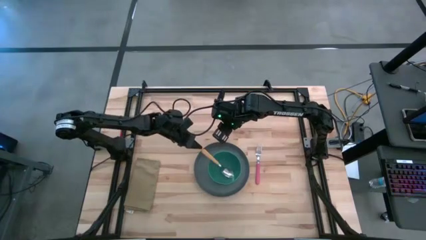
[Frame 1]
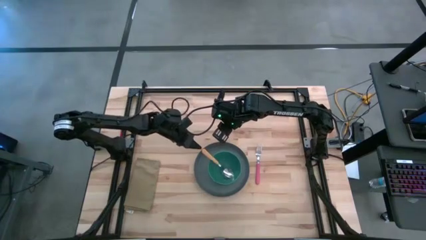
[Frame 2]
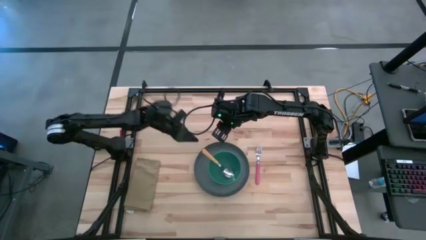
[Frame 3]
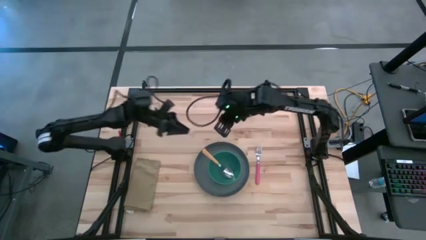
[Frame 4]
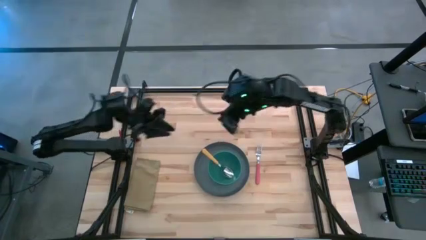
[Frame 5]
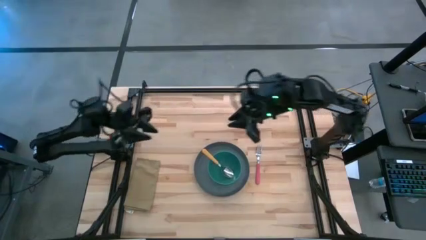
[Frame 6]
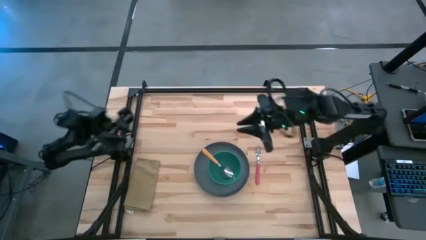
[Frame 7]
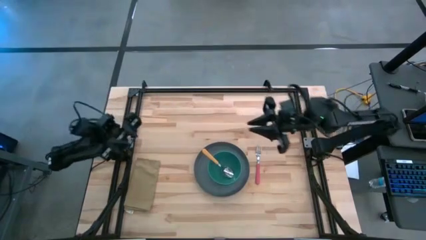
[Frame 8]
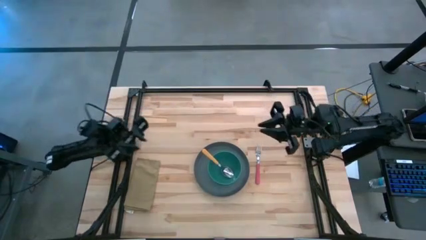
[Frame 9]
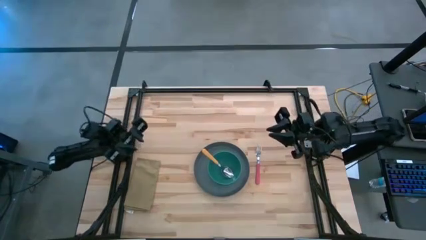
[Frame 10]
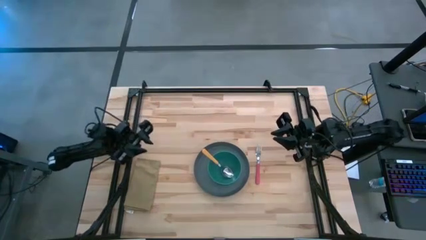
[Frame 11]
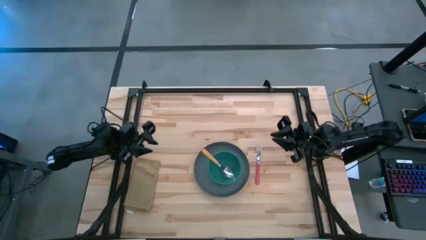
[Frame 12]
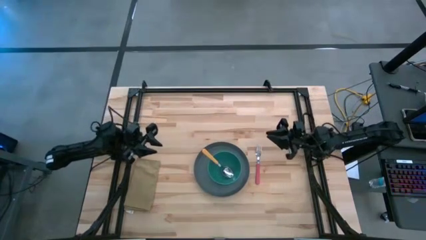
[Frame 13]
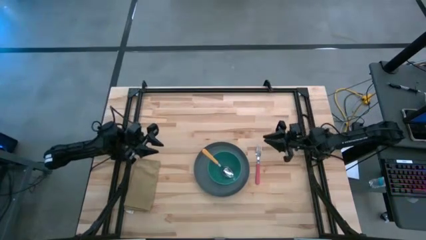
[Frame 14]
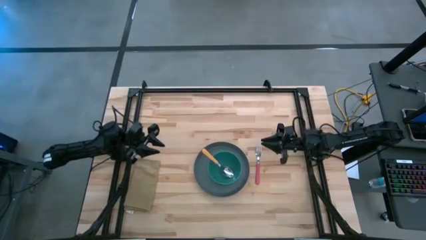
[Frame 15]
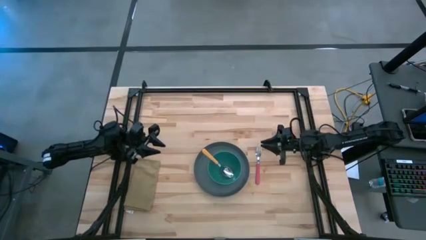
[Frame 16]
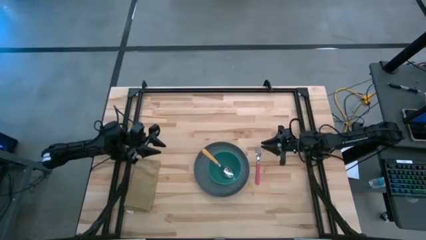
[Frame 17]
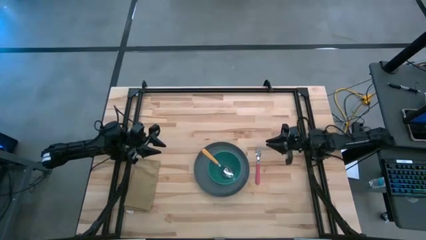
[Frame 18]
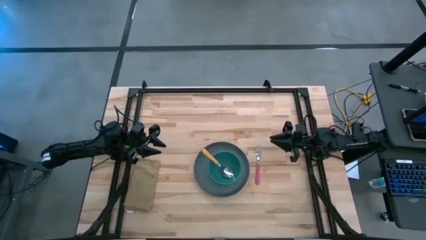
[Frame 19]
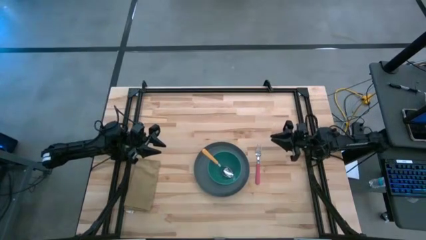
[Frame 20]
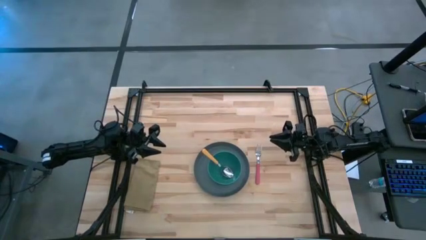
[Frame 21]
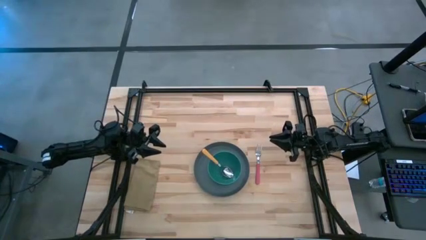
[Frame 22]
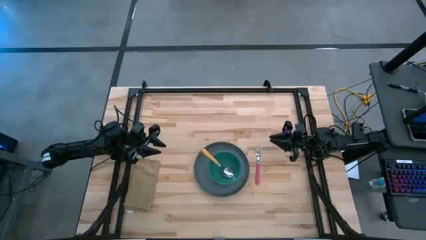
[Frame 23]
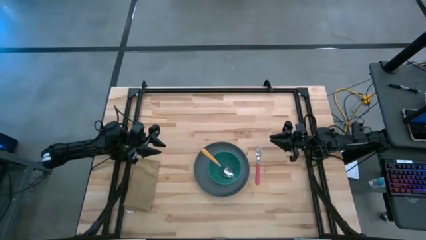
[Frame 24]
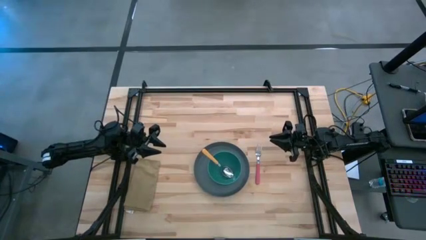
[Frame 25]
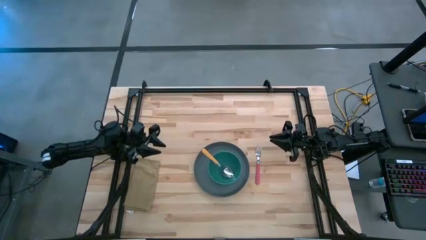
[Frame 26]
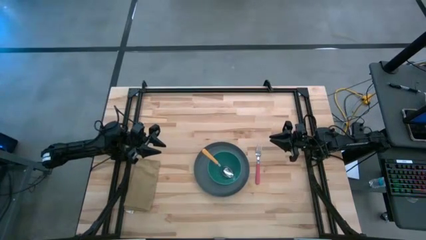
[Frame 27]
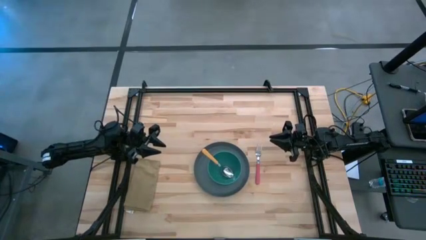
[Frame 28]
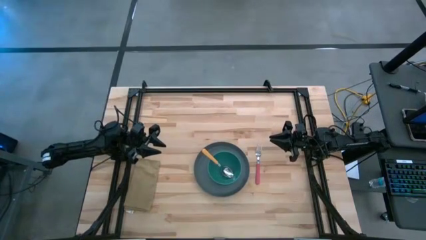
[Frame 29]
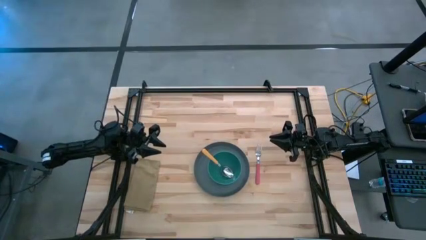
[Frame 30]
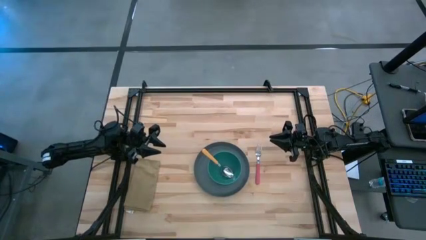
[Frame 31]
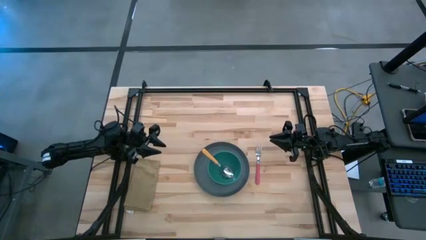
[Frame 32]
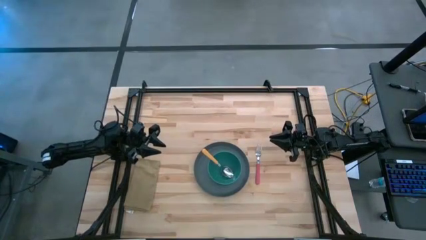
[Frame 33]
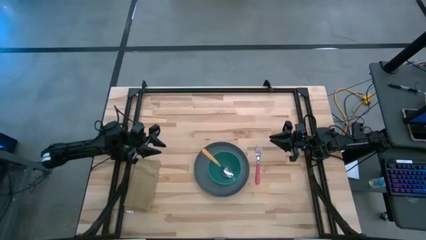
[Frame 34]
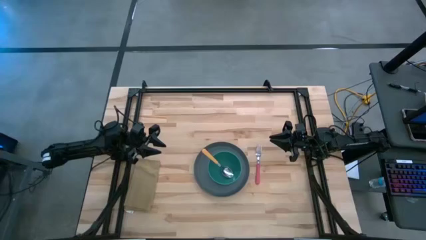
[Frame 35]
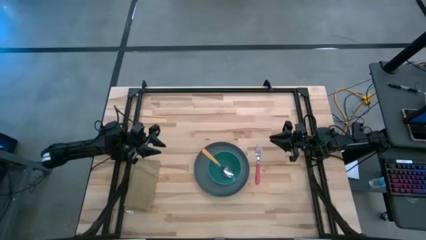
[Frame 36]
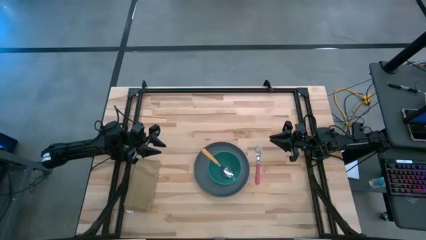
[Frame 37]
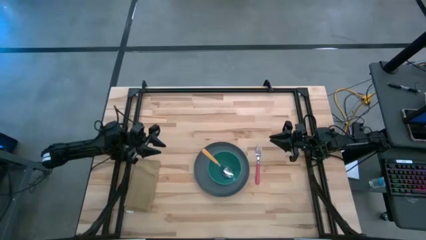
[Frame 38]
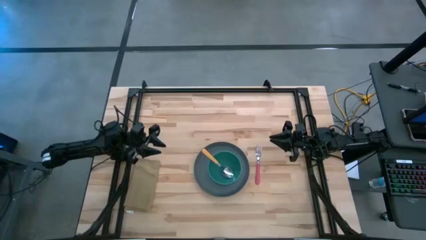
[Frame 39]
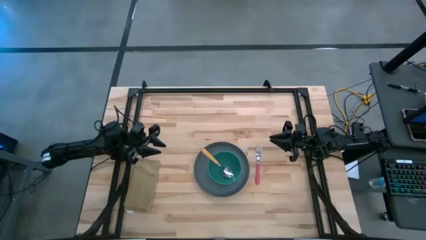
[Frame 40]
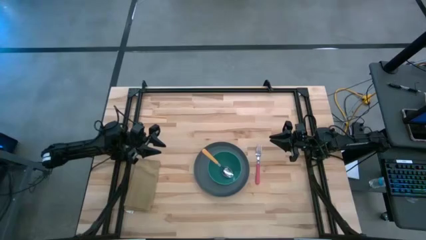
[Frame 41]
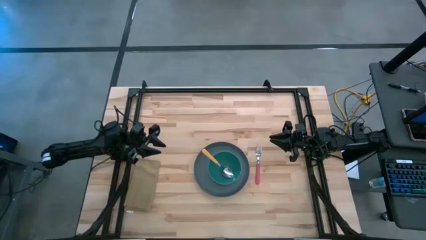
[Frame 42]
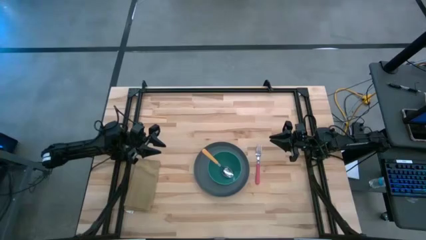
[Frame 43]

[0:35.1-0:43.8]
Task: Set table place
Return to Home Position

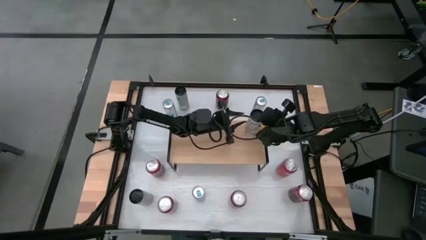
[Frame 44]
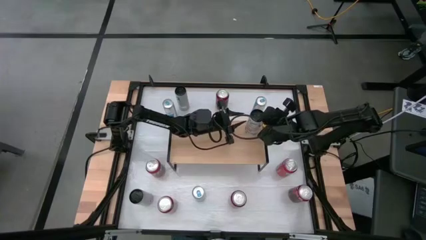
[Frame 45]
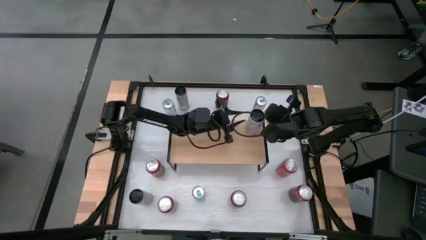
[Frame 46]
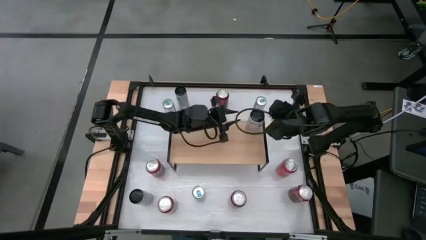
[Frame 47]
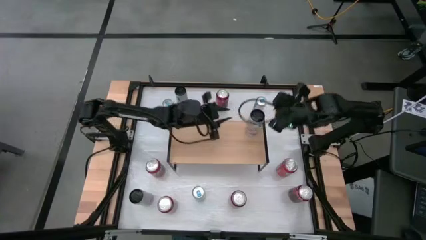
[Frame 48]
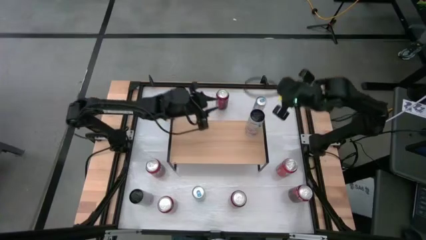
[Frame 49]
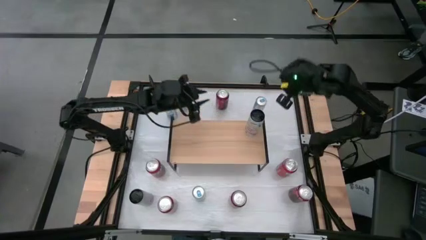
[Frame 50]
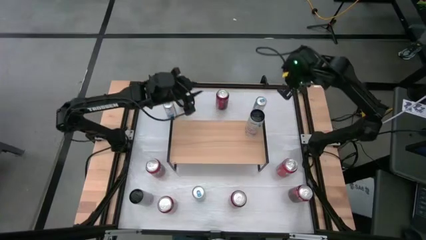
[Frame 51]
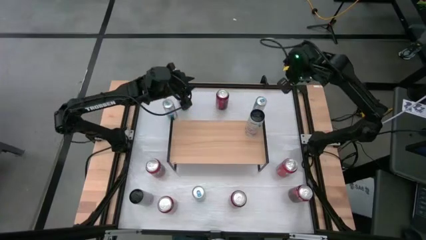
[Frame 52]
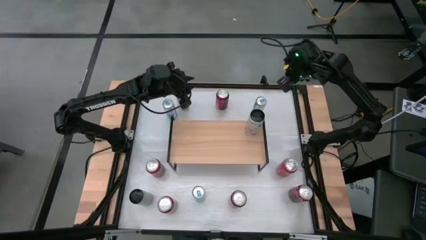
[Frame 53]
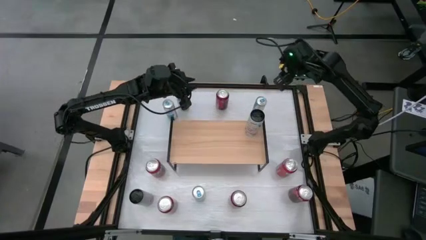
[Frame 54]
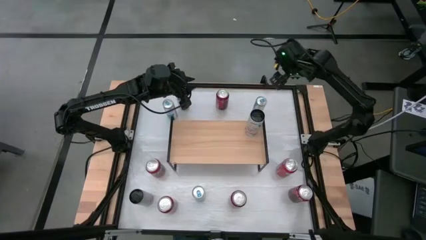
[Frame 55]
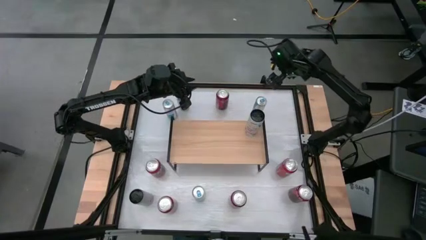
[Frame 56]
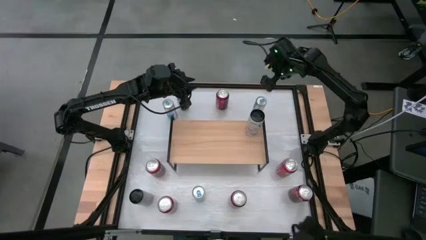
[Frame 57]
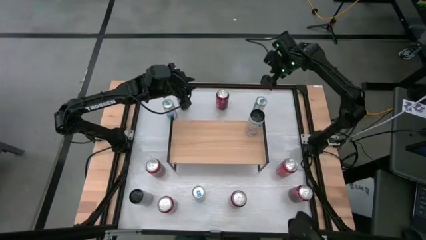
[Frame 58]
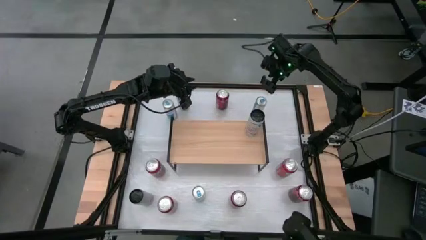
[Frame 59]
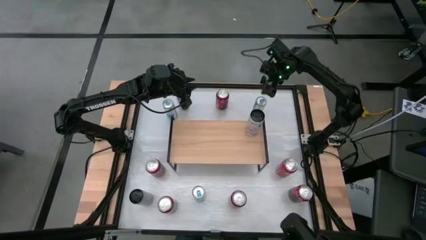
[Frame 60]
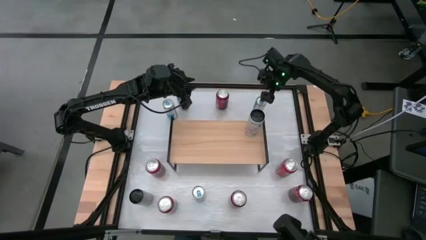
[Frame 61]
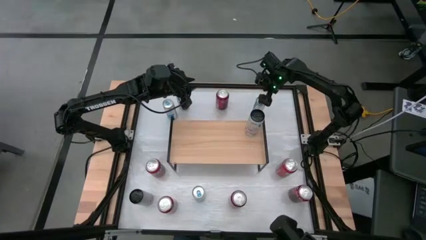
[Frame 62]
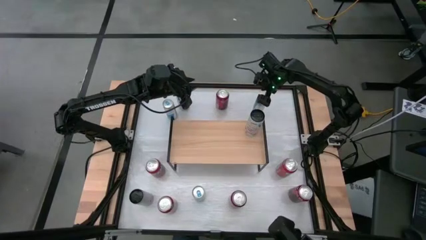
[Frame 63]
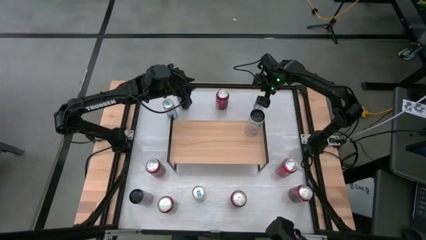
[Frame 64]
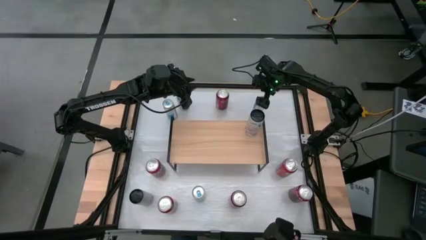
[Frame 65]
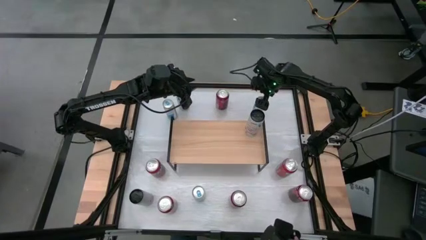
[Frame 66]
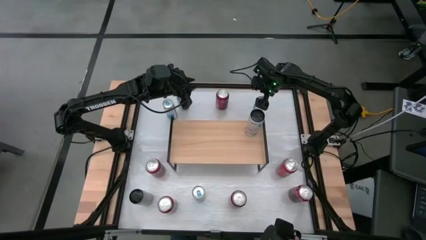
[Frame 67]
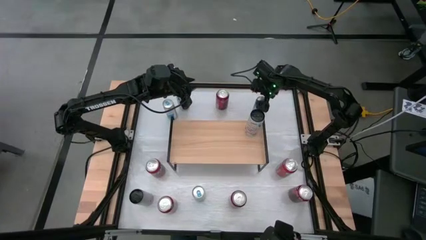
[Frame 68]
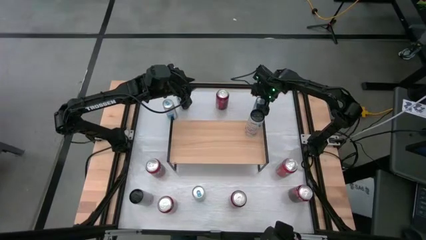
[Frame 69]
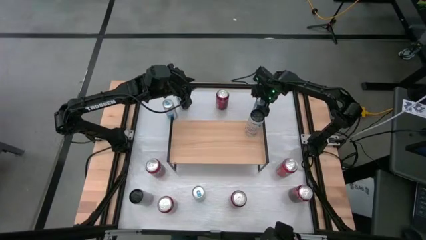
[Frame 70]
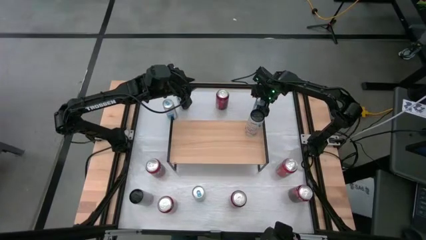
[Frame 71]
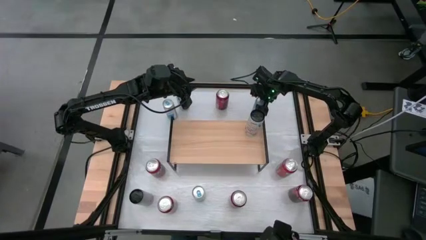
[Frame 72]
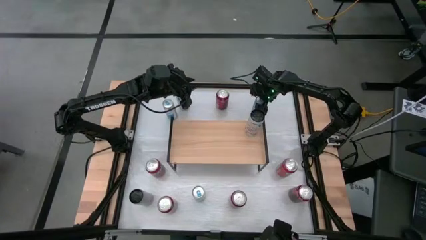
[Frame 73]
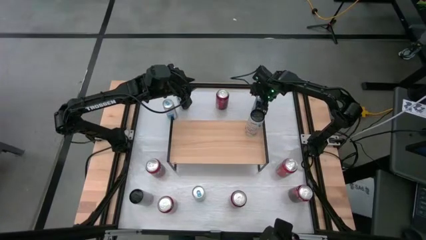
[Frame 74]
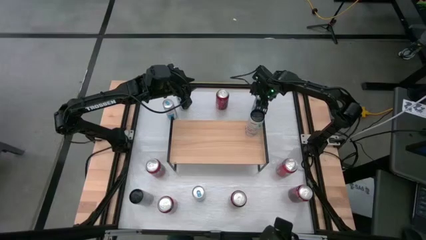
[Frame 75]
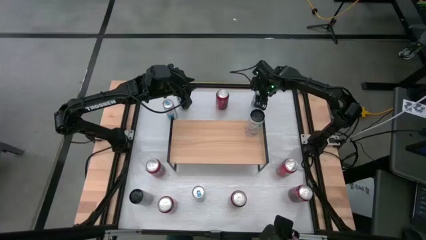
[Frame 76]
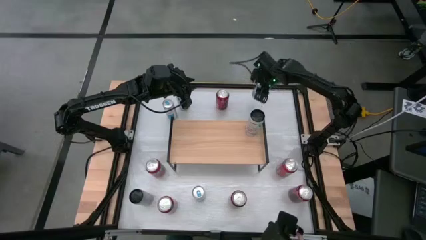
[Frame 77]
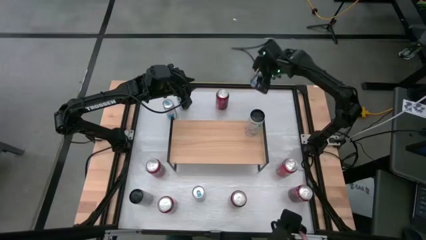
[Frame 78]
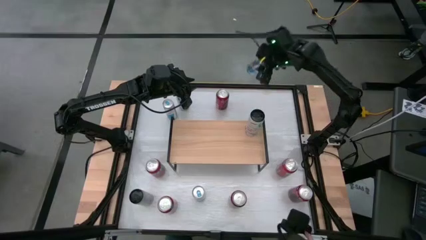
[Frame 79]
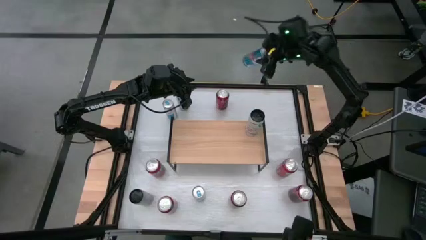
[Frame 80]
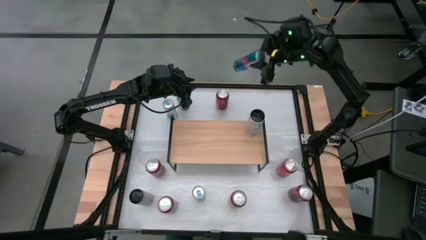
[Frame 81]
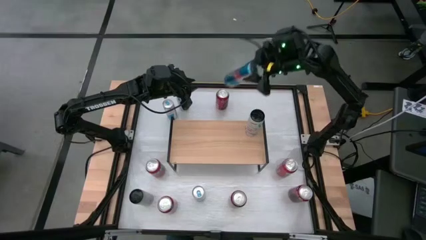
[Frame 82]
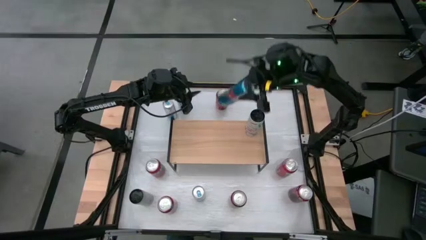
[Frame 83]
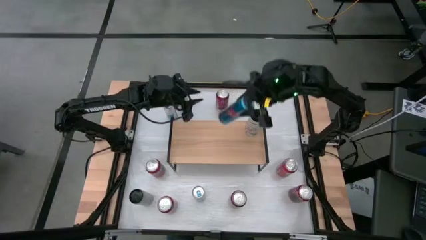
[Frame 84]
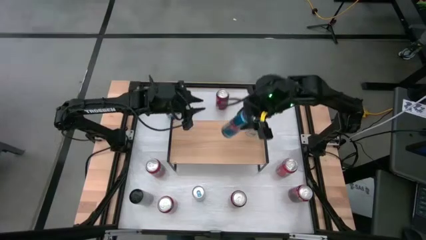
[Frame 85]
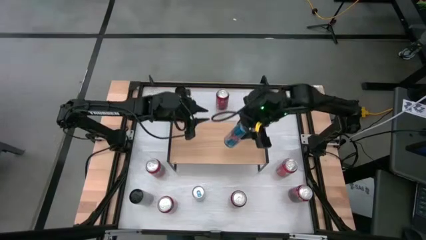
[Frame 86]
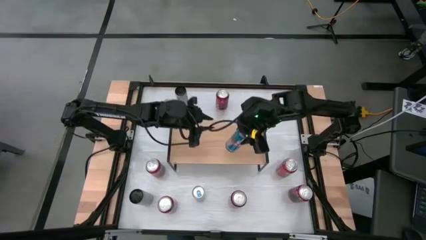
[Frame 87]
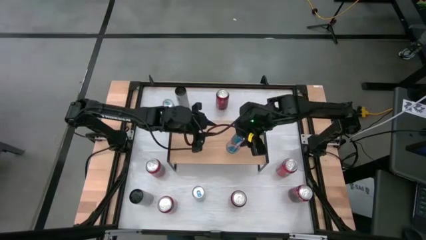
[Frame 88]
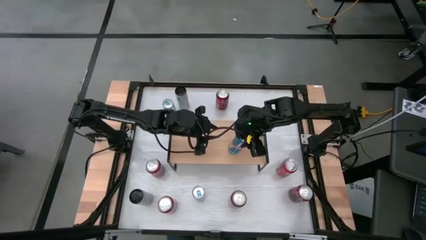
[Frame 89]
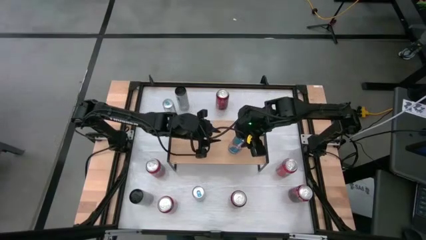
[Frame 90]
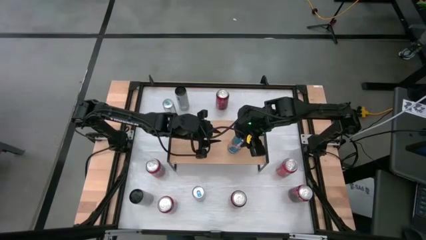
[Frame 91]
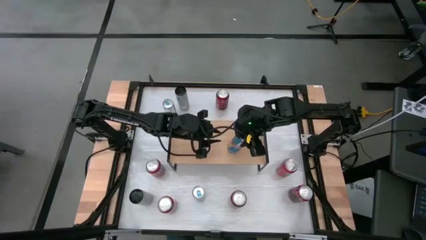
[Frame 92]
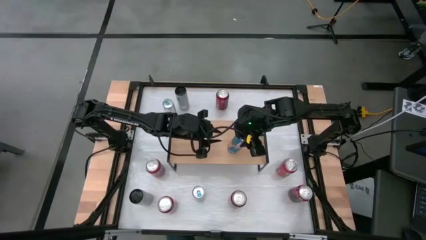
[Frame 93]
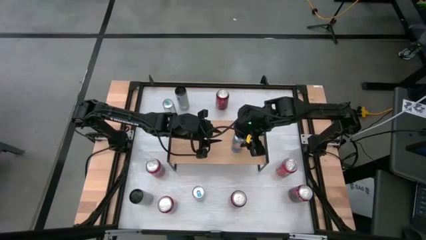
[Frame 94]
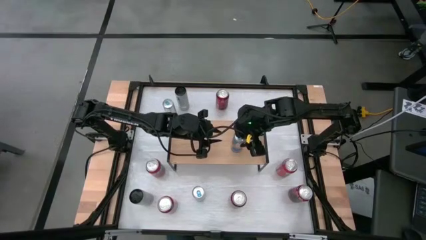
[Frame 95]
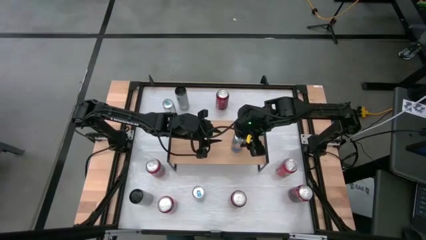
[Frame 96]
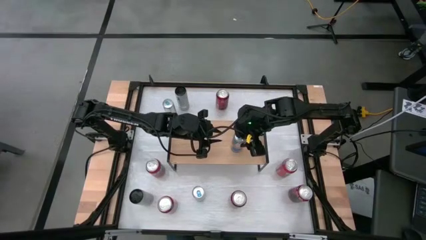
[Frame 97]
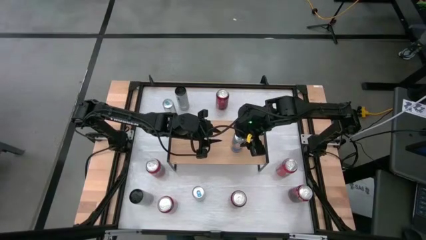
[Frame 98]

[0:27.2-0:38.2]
Task: Place canned beverage on shelf
Put the top right blue soda can on the shelf
